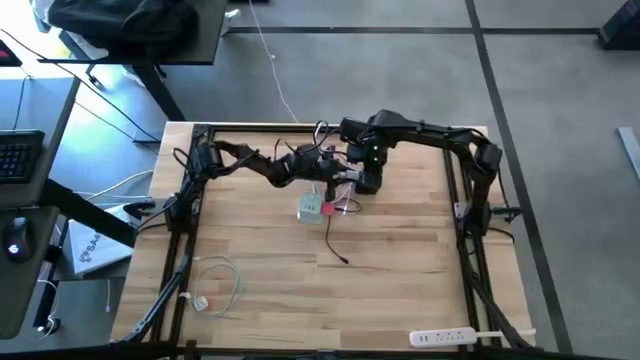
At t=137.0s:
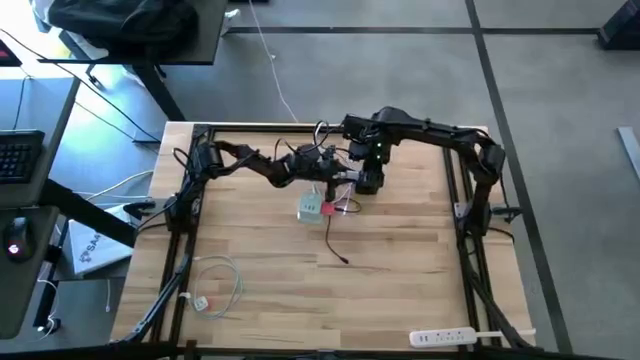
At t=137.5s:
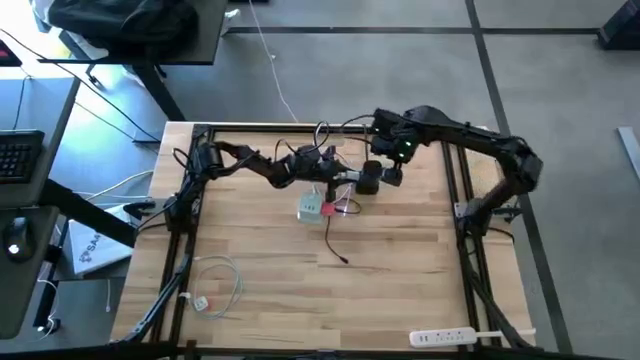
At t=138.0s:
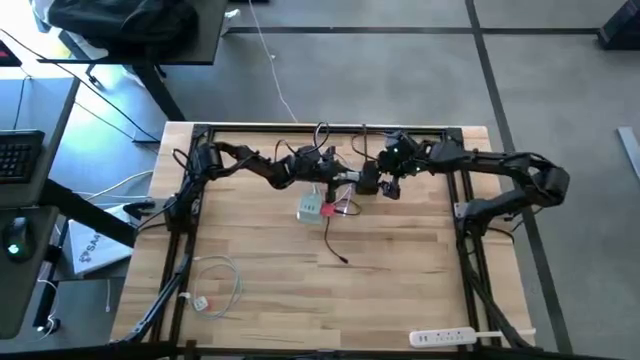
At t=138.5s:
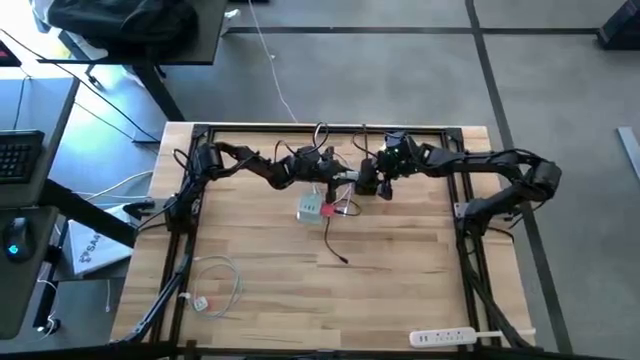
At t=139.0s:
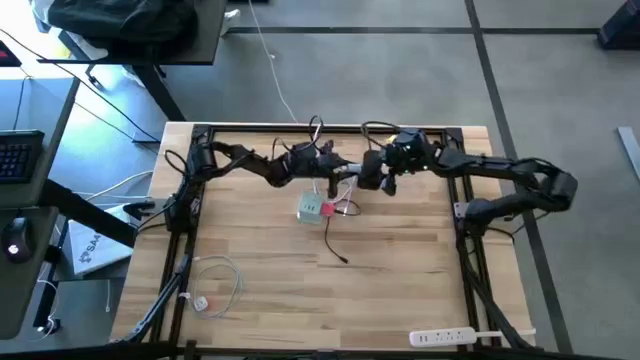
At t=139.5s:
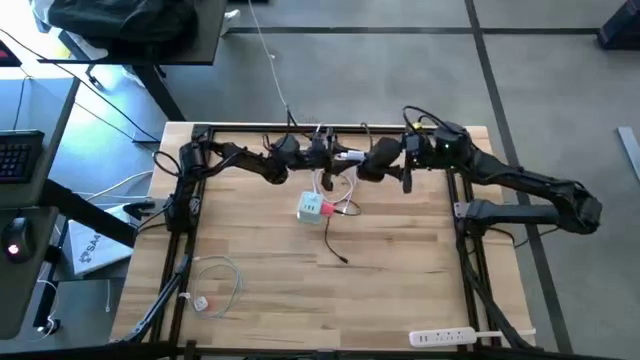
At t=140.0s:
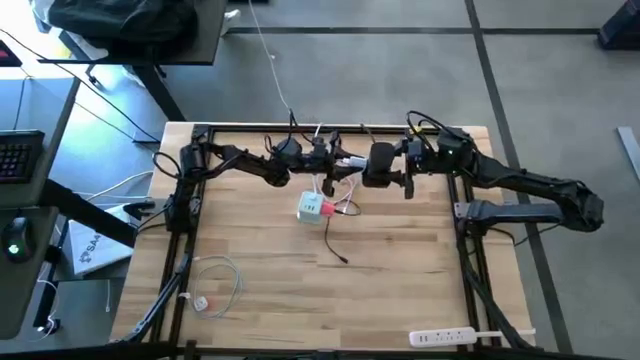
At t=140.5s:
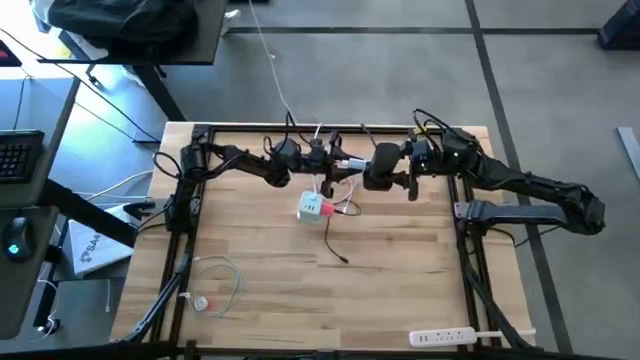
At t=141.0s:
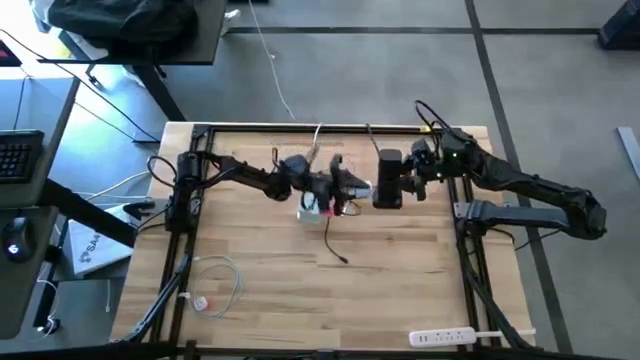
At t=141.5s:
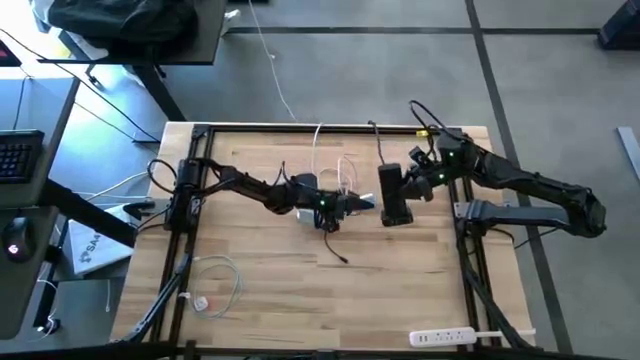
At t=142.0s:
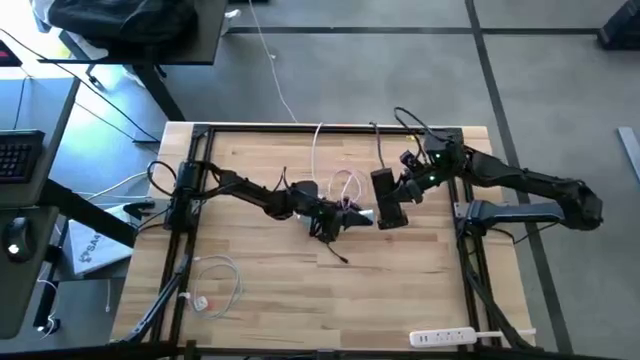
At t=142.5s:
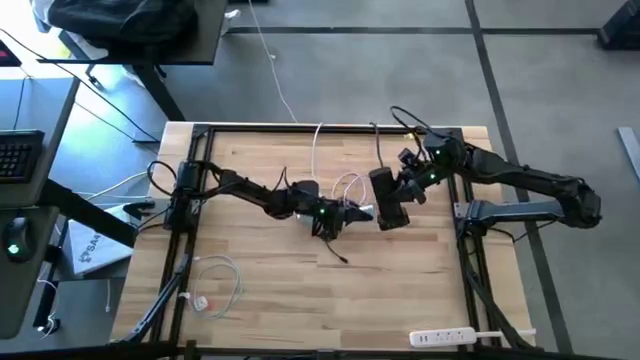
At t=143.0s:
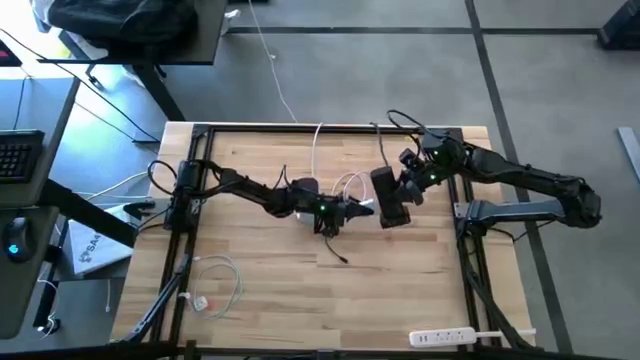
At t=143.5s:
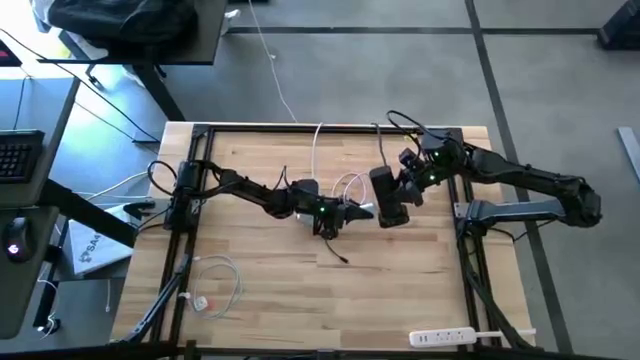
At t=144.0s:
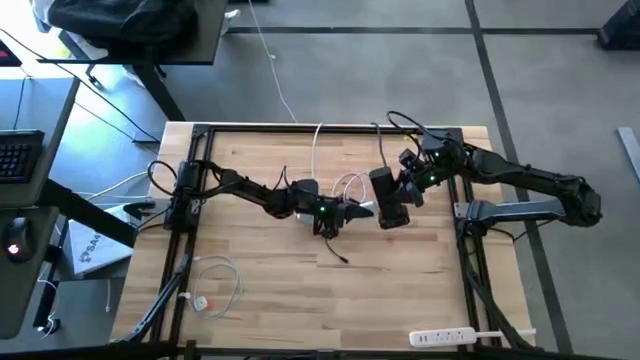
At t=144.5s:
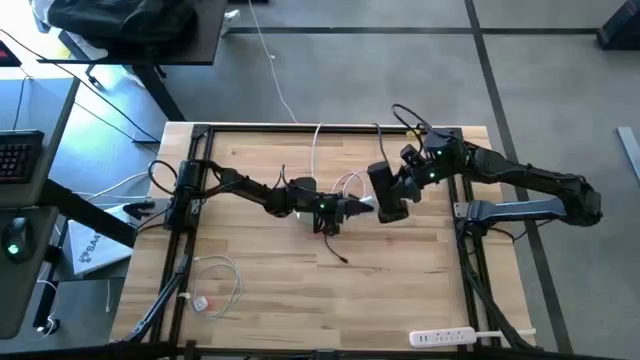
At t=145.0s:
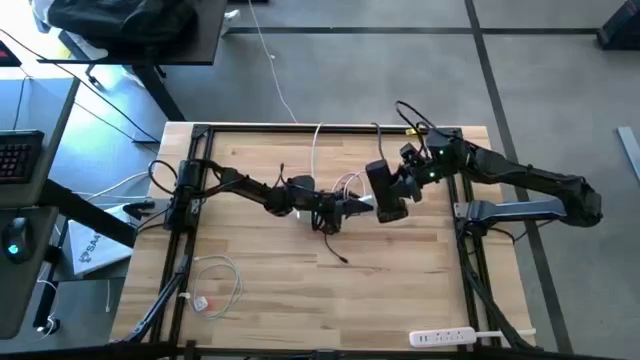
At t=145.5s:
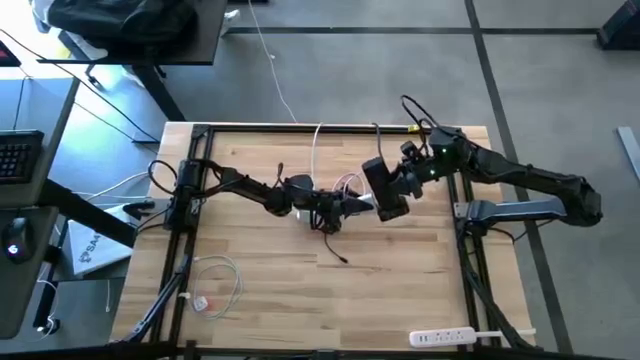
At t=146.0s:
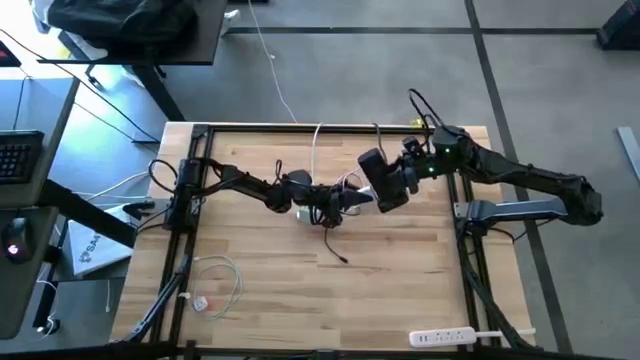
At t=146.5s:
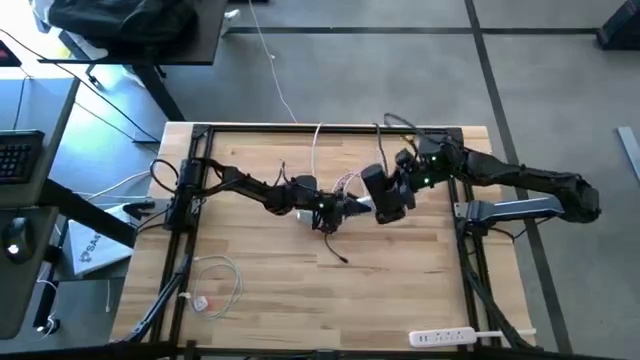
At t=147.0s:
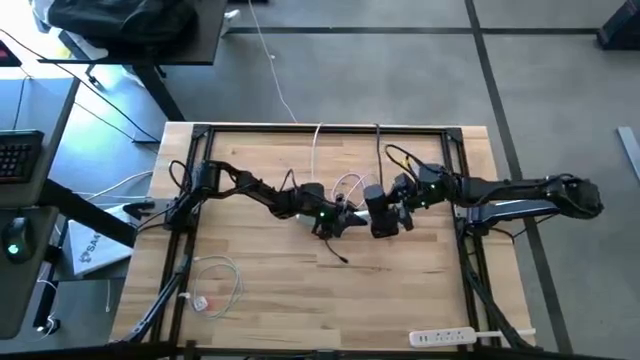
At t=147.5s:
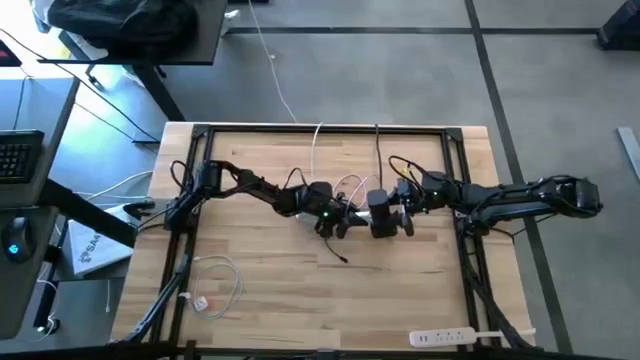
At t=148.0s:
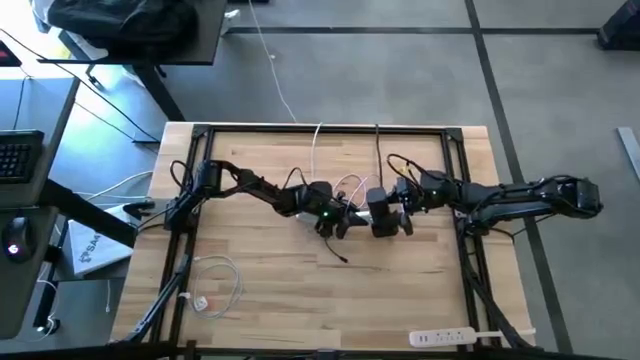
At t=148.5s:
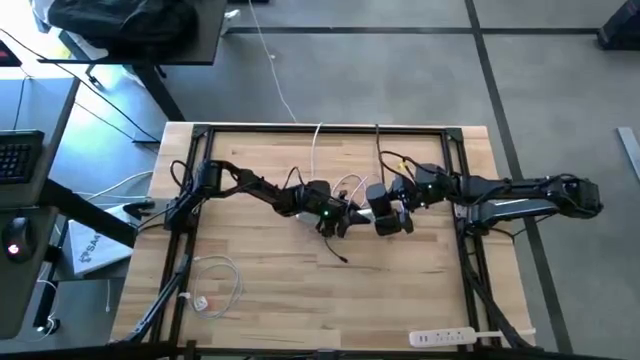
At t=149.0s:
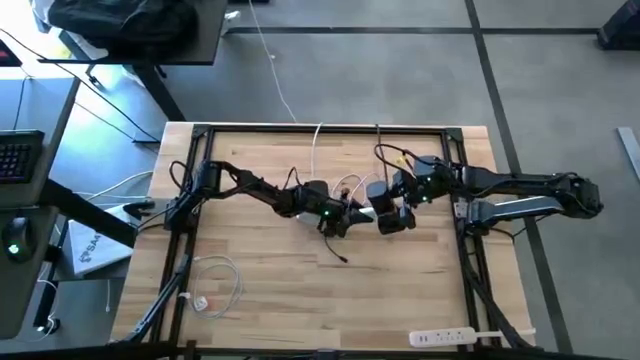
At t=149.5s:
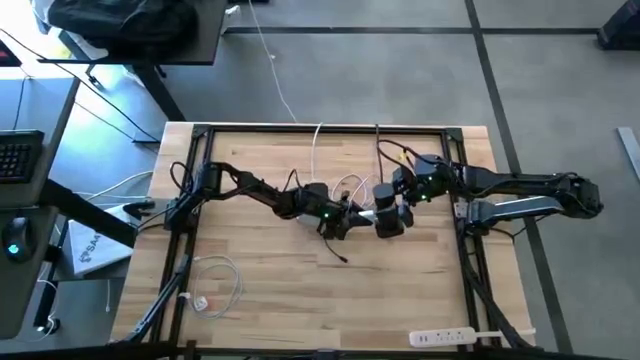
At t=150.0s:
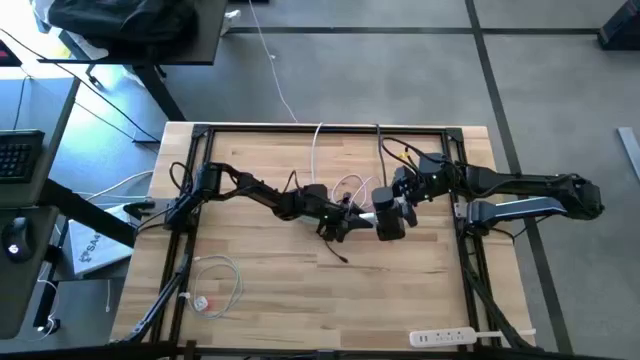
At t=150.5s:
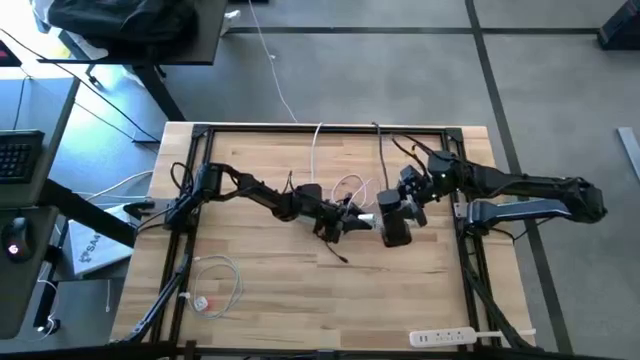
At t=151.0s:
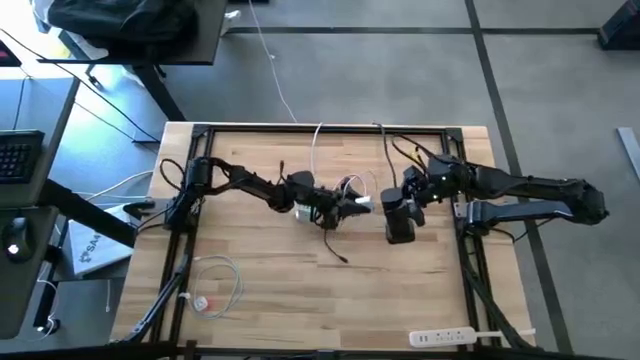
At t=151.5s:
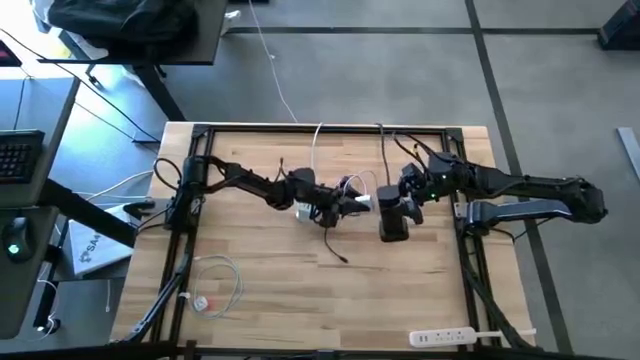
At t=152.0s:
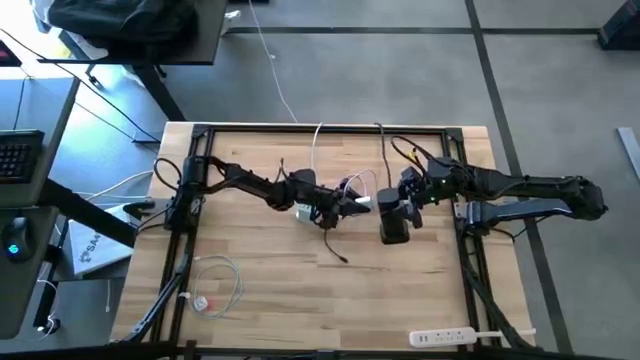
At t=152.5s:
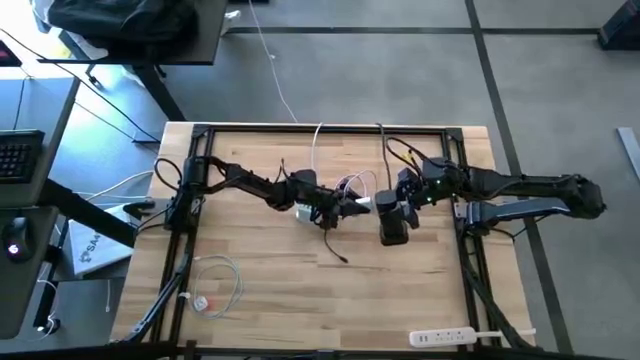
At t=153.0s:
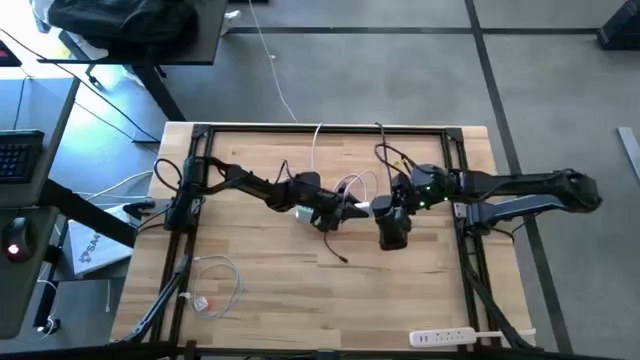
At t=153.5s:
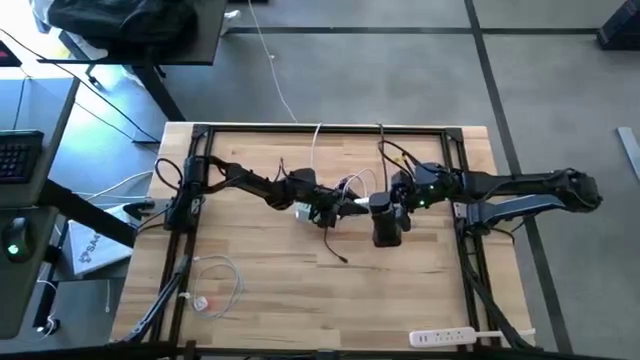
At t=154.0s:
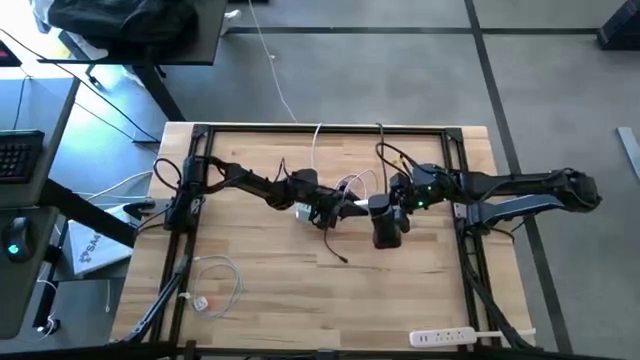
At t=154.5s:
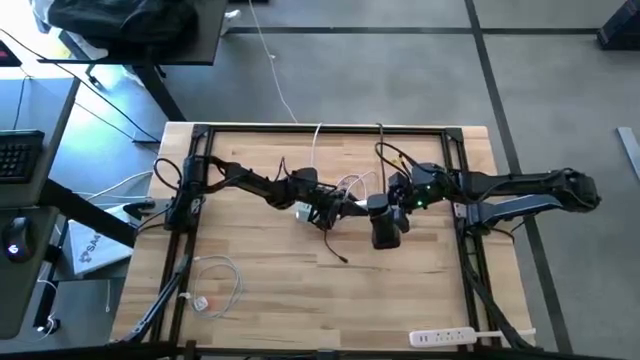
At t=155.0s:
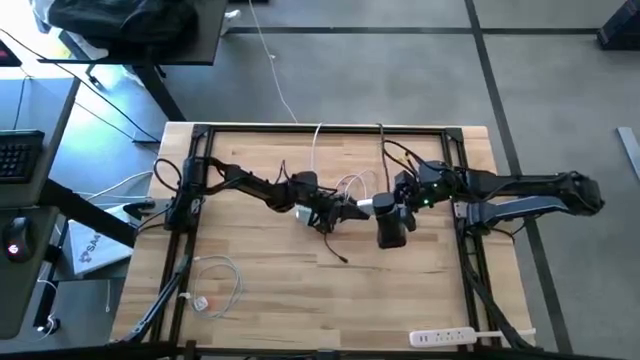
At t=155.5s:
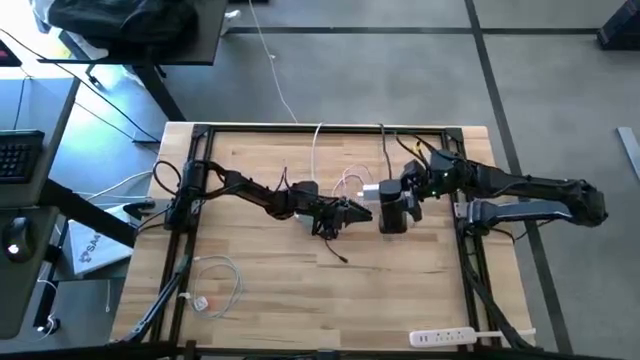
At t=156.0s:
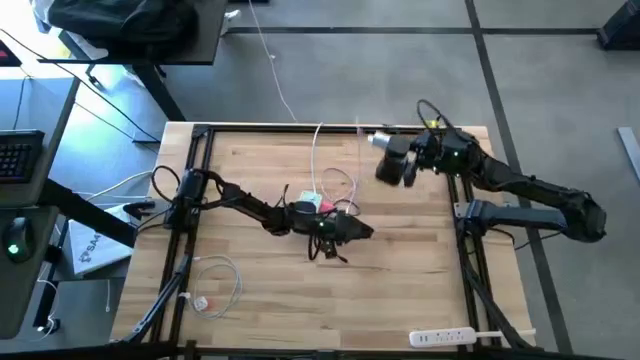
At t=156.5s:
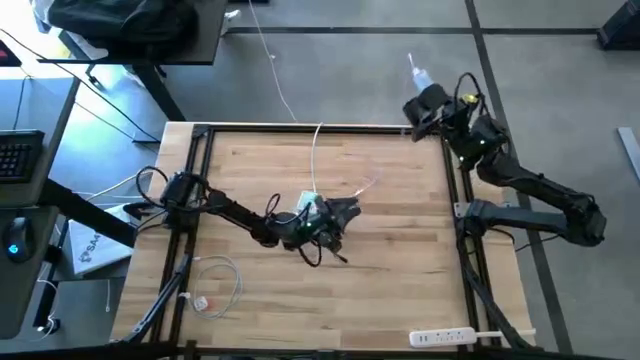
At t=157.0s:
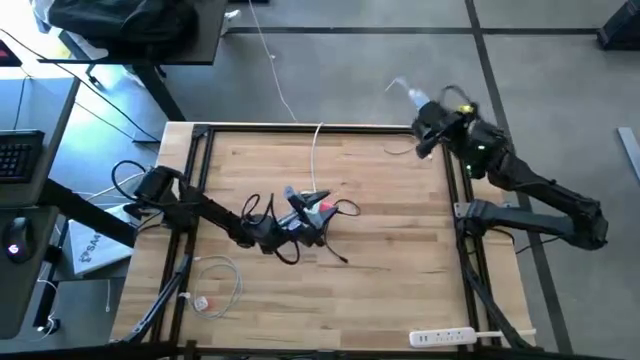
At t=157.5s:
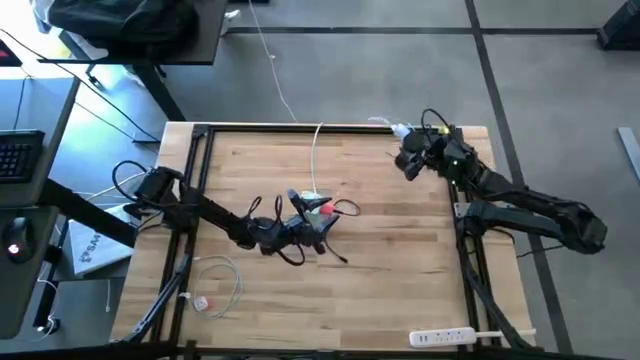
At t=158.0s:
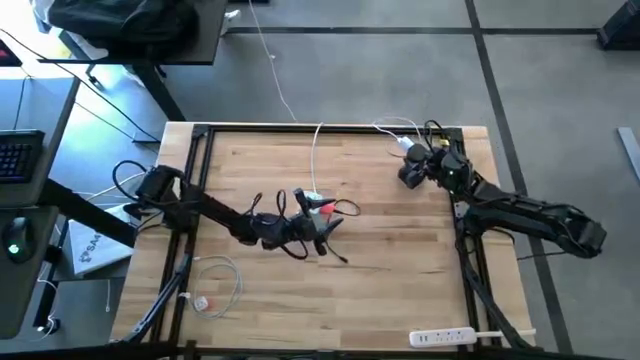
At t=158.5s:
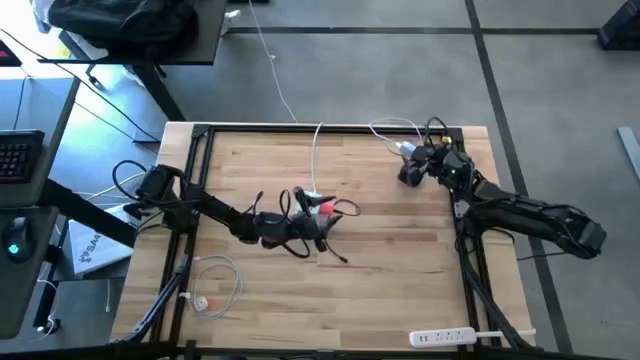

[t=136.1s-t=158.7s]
Task: Insert USB
Insert the white charger adapter into the black outlet extension
